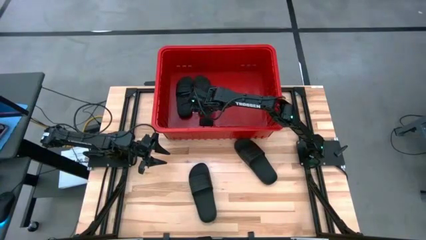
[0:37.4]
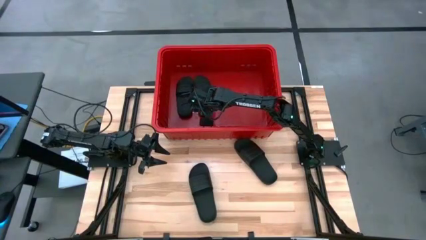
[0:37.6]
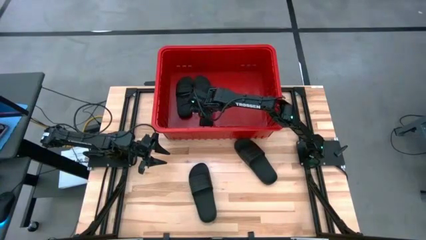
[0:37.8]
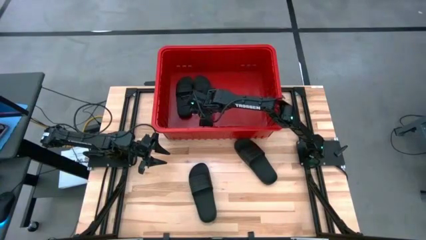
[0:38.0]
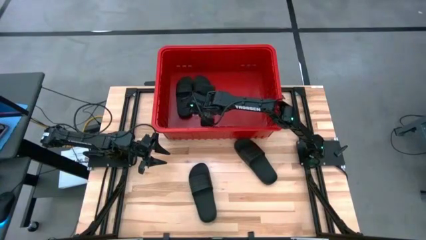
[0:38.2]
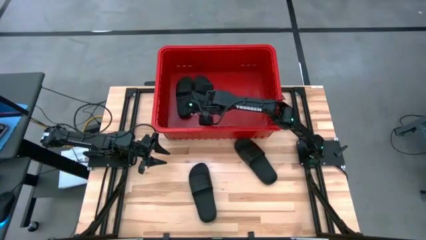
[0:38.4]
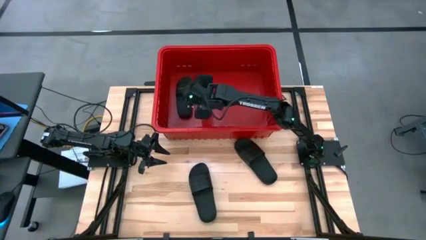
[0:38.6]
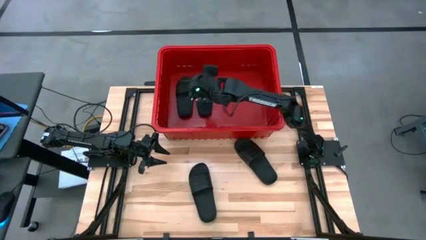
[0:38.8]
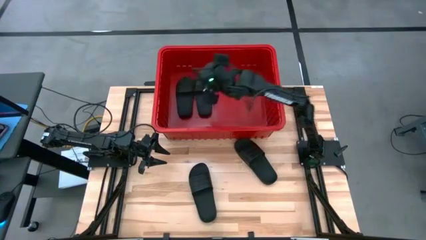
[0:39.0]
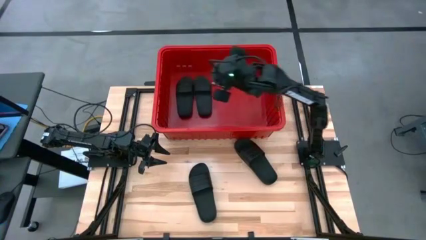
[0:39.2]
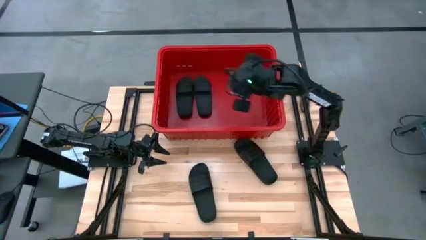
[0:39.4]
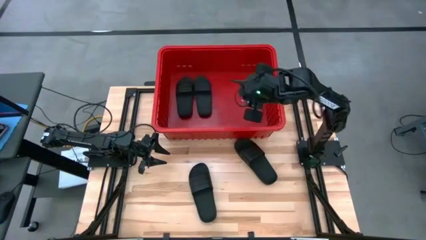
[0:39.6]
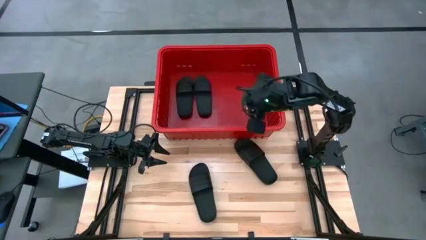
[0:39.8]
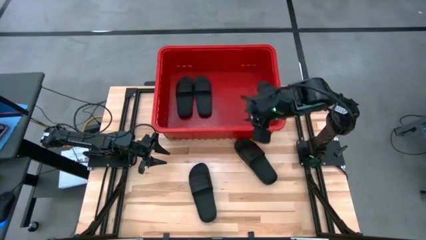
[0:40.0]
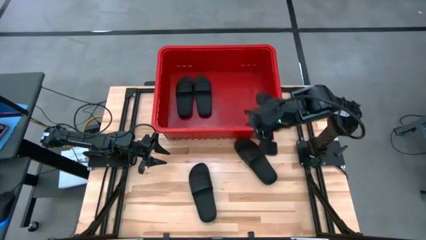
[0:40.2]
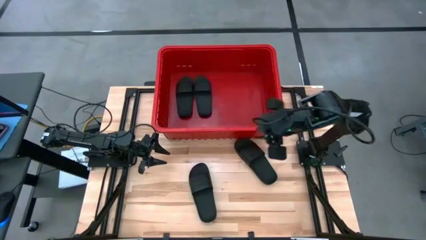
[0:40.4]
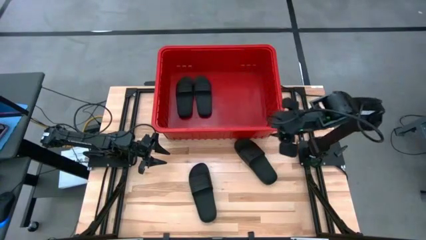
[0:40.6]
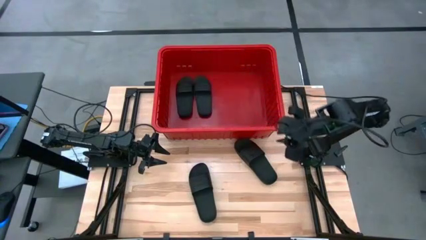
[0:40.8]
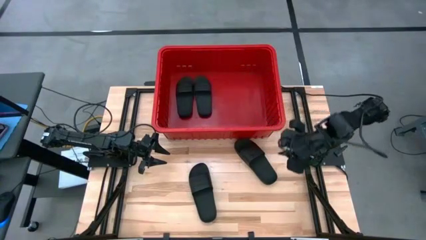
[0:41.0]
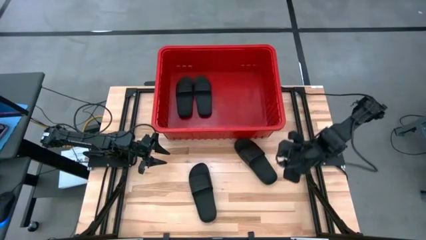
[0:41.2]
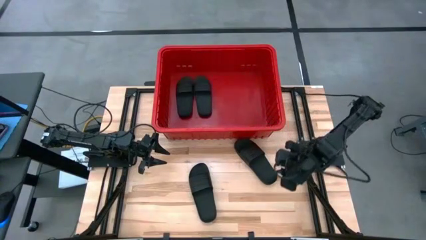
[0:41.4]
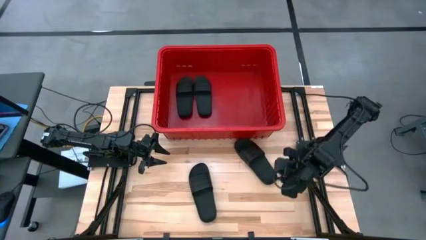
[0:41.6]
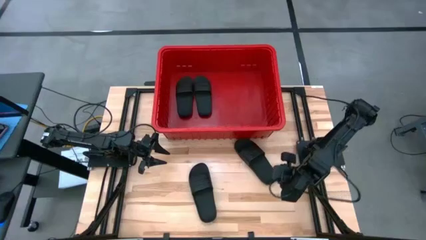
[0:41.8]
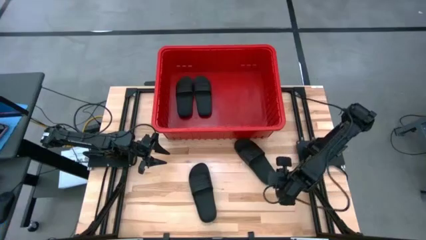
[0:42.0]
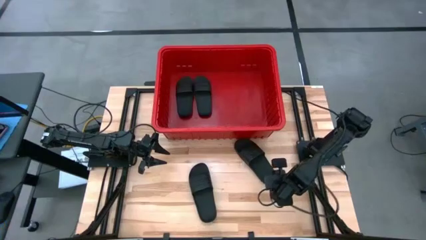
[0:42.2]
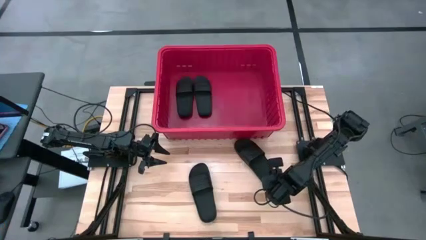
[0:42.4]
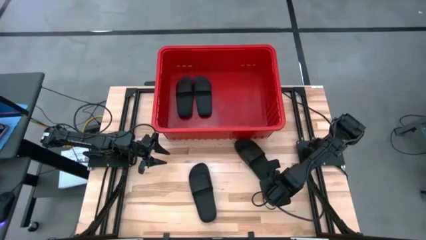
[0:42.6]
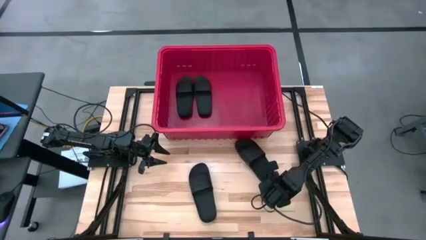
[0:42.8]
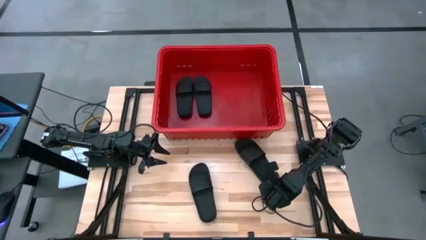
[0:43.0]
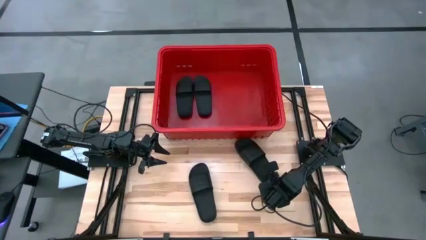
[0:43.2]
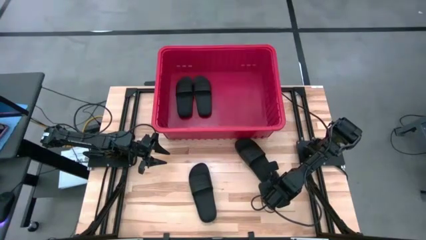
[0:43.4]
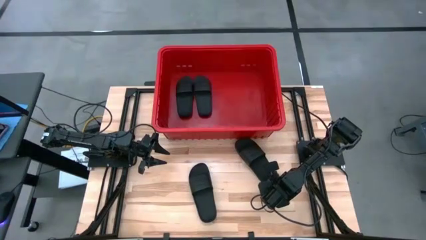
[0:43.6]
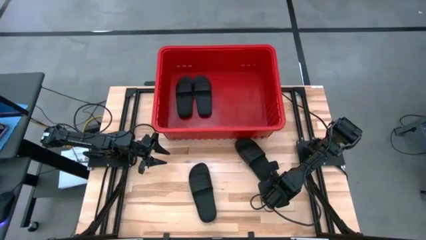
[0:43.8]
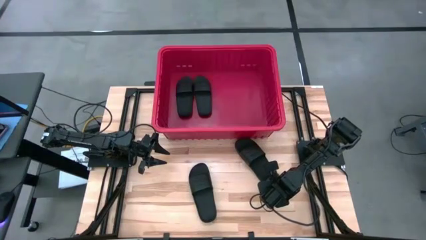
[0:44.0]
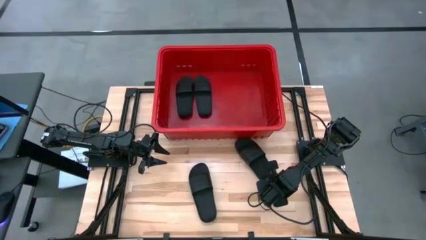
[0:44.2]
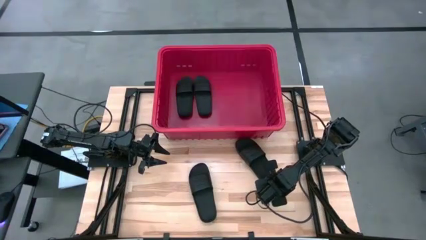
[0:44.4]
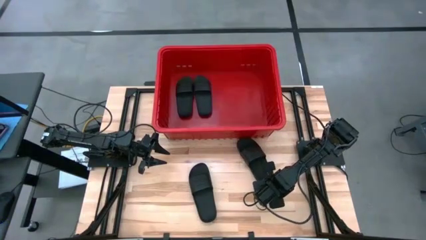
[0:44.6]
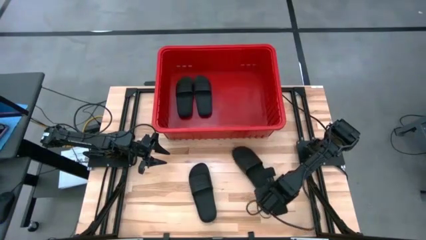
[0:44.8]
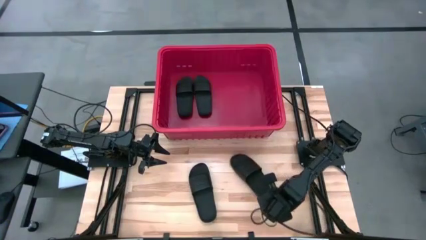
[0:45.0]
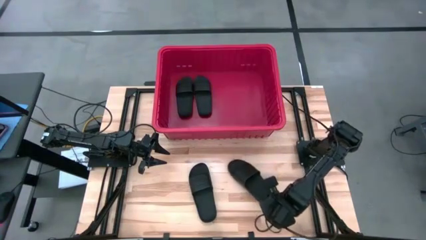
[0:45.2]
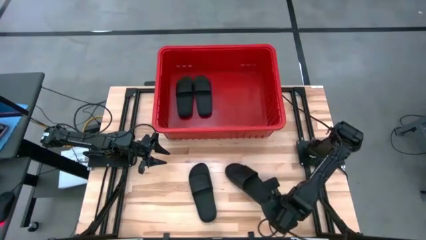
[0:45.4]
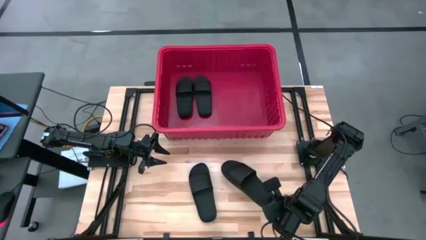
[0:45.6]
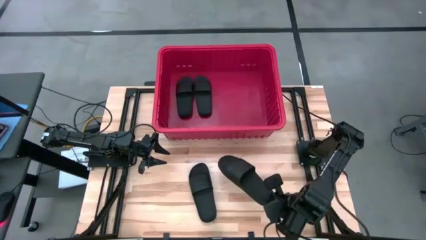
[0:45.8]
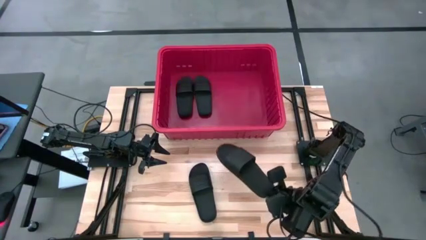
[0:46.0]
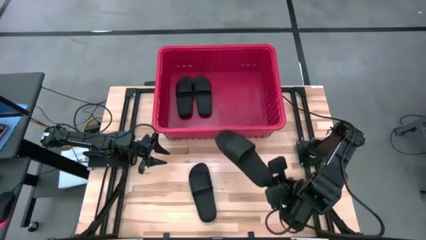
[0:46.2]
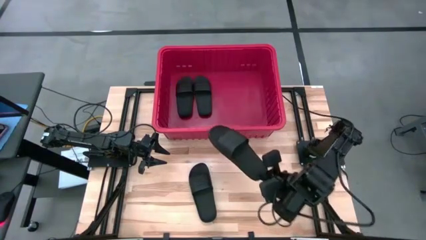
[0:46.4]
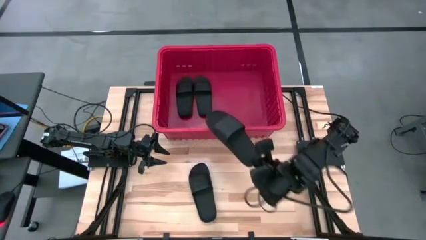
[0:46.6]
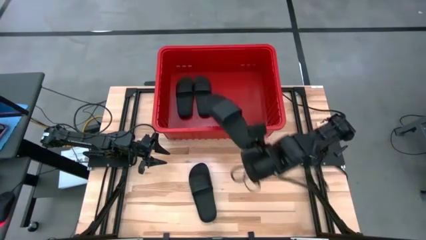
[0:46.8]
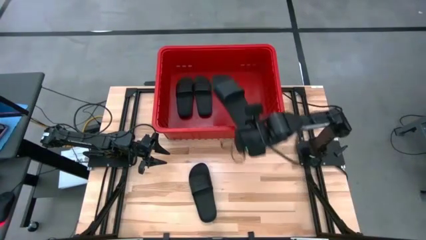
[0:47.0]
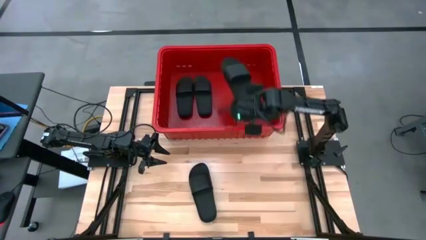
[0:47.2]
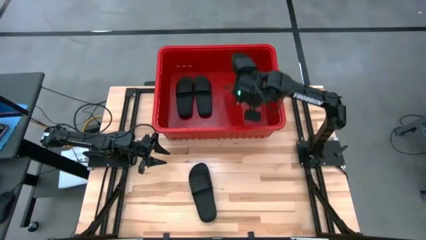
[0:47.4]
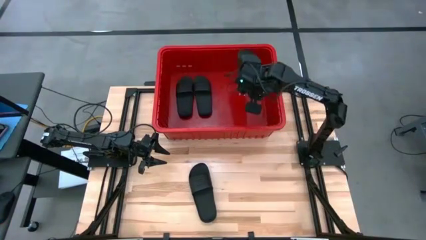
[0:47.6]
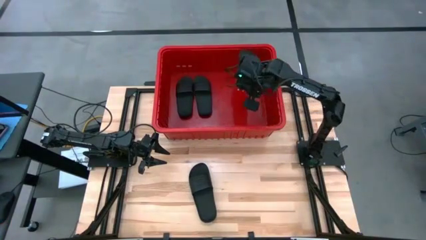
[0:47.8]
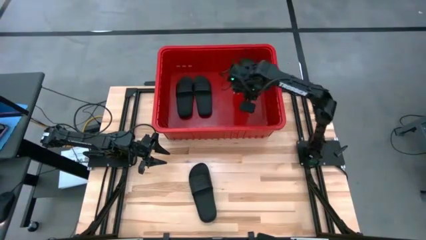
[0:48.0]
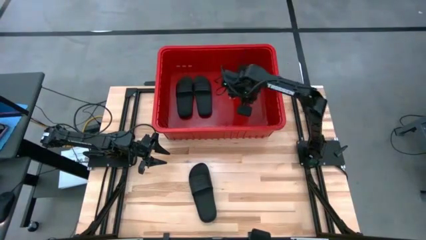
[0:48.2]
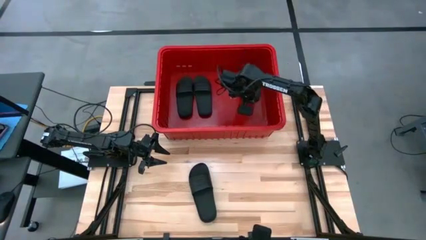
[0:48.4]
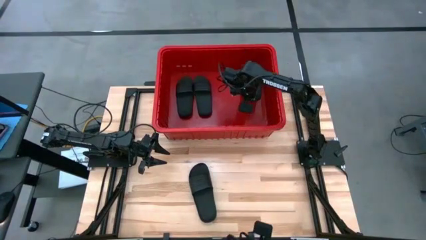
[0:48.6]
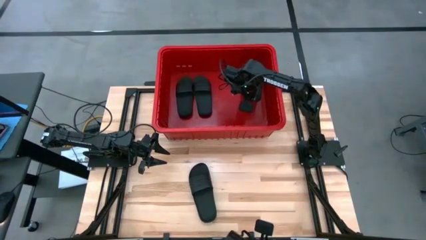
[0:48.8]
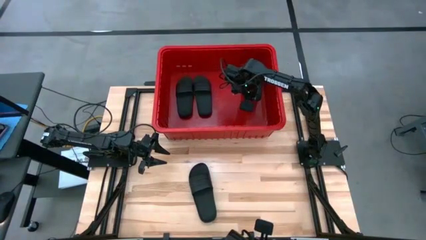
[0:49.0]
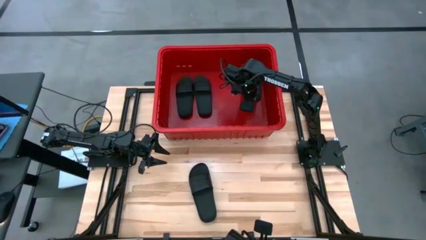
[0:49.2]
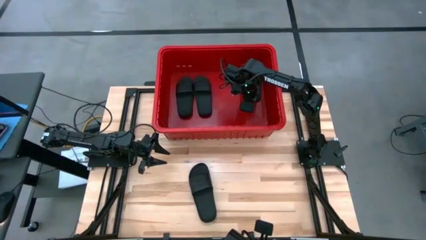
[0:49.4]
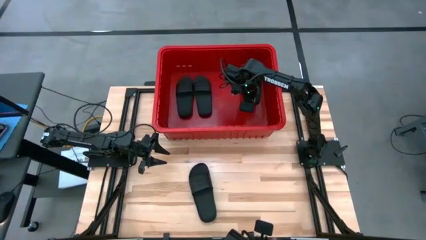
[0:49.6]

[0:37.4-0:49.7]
Task: Pick and place slides into bin
Put the black slide into the red bin

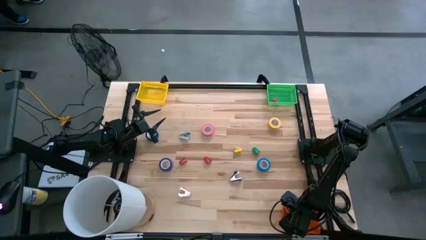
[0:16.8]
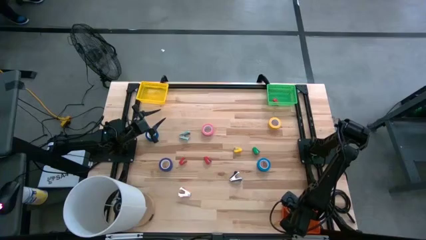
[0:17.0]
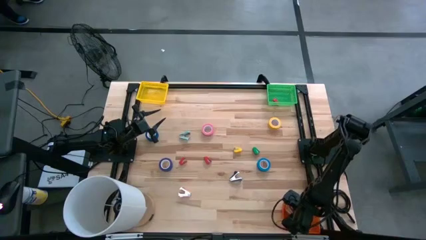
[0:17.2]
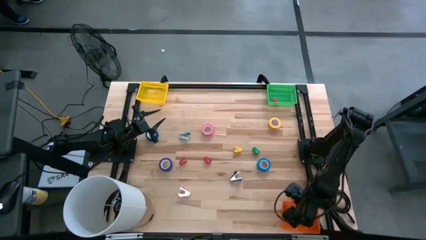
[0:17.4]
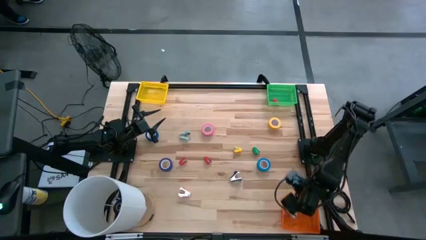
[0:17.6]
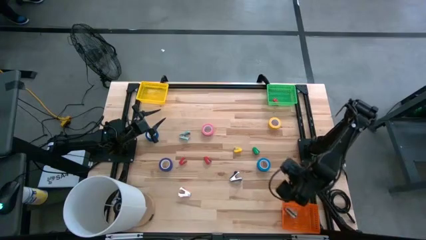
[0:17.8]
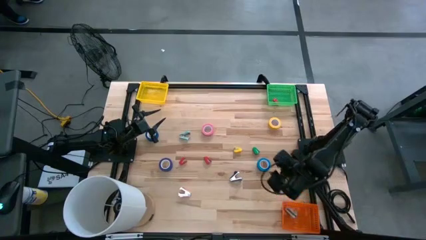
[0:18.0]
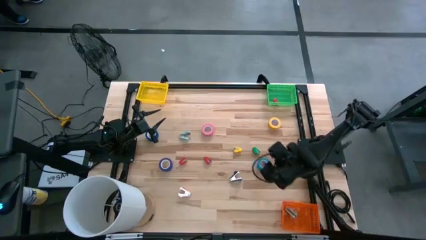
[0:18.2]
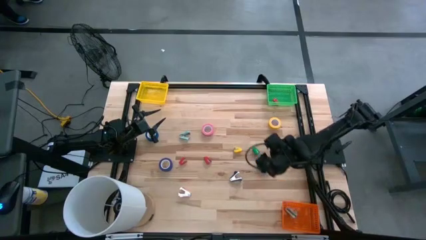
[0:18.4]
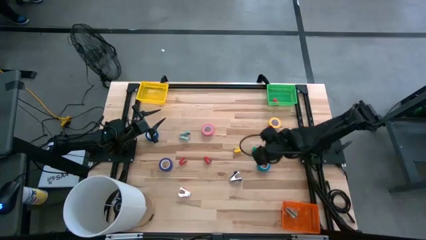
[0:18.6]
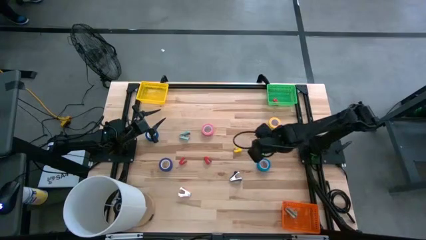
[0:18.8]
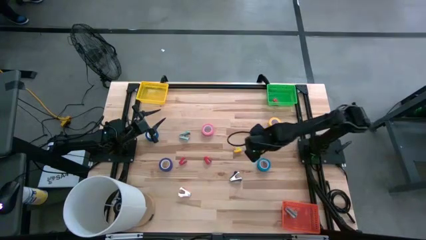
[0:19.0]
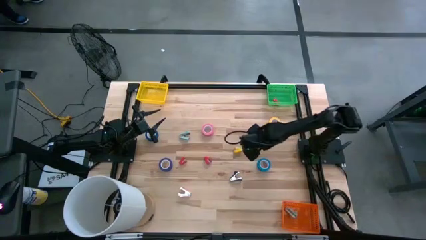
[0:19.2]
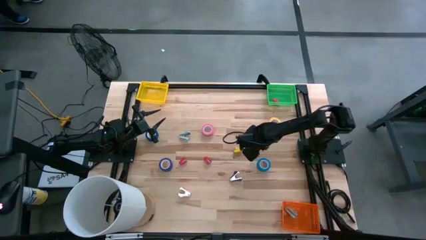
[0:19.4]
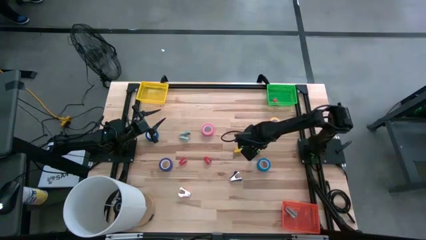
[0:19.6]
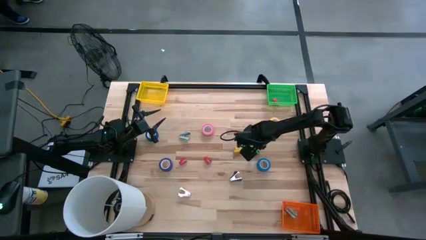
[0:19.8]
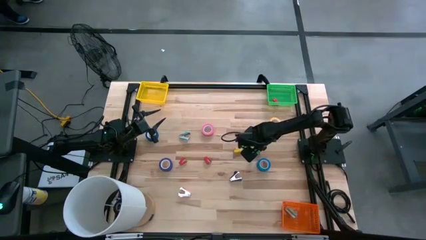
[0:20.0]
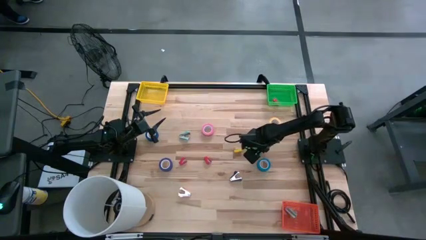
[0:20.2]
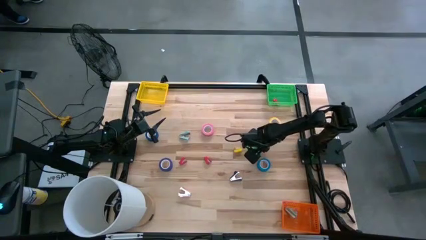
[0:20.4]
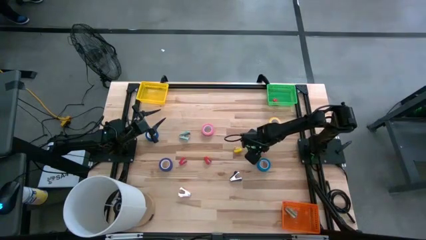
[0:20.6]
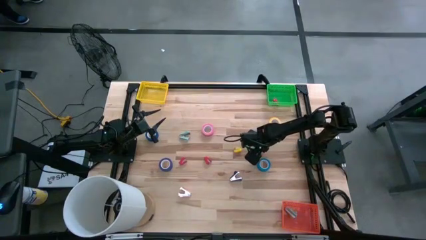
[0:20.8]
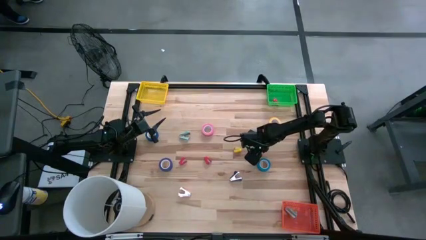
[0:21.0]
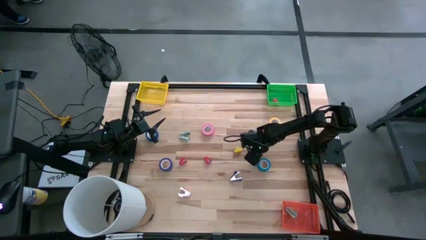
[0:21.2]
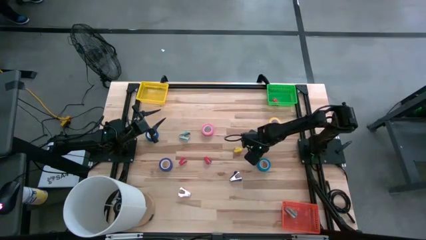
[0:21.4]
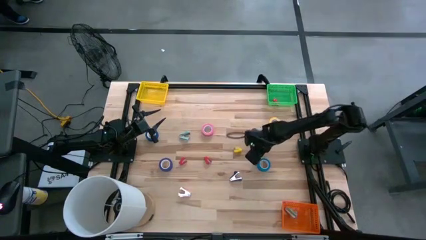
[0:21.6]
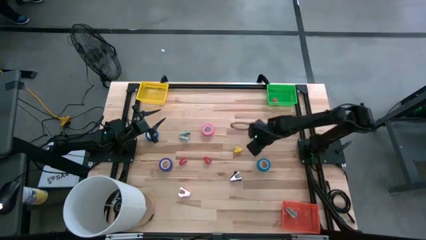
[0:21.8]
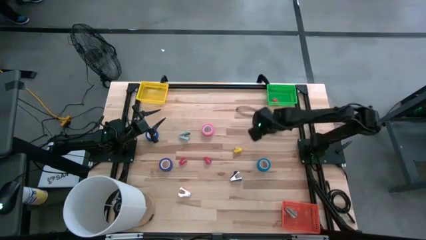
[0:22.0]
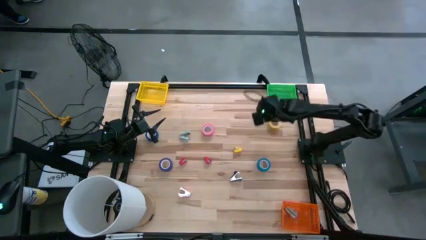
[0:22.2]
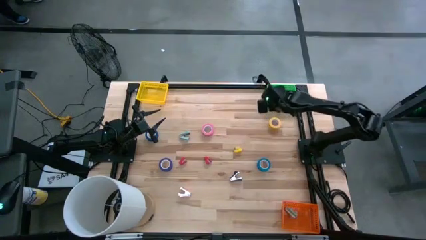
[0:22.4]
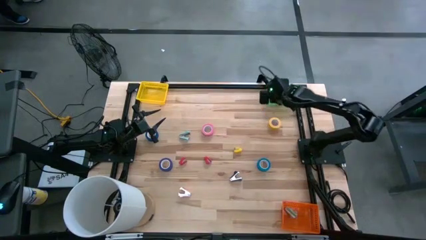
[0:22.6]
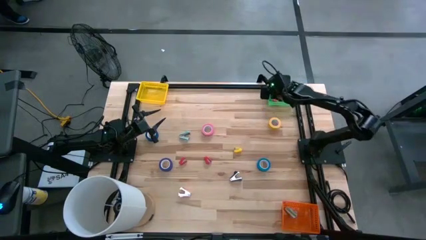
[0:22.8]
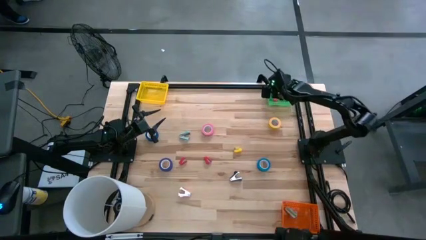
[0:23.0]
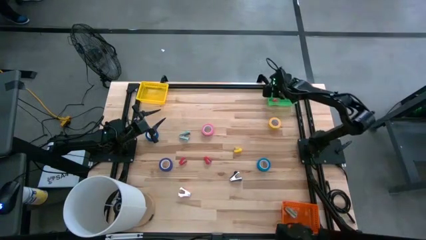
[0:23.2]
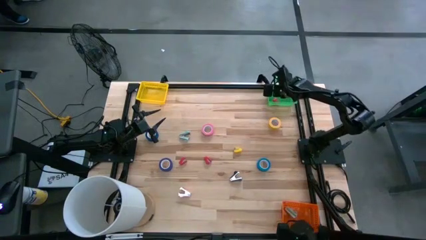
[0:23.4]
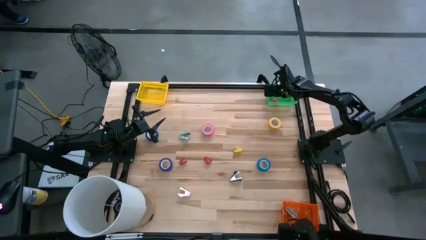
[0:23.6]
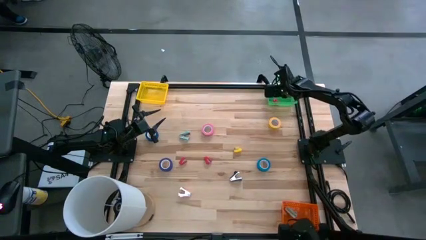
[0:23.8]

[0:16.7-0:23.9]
Task: Pick and place Stapler, Stapler remover, tape
Put the green stapler into the green bin
